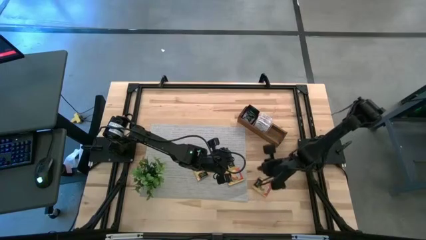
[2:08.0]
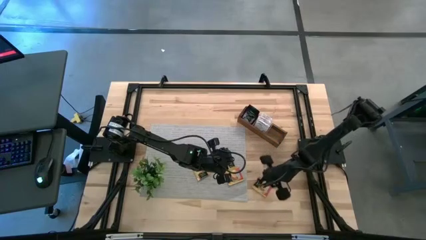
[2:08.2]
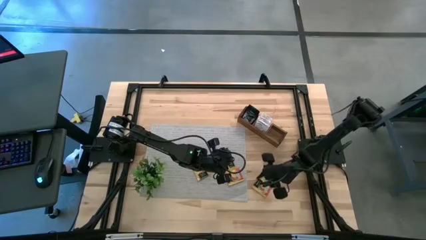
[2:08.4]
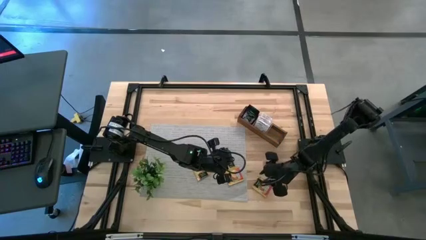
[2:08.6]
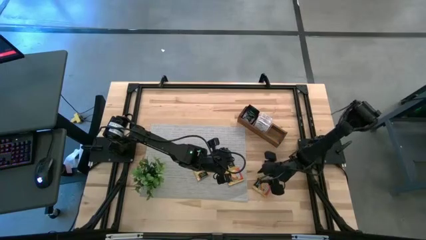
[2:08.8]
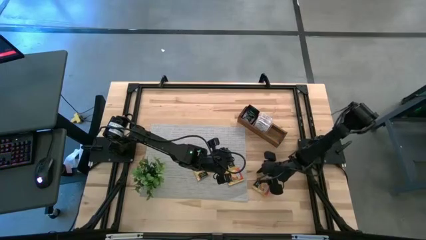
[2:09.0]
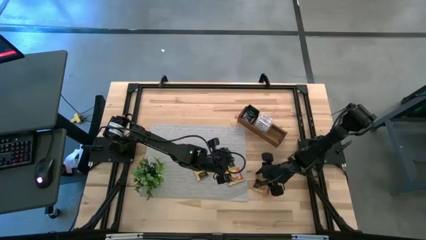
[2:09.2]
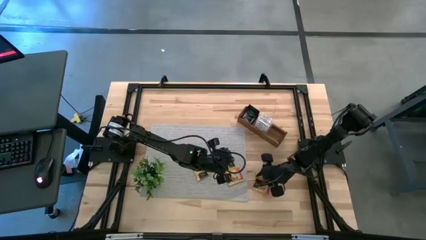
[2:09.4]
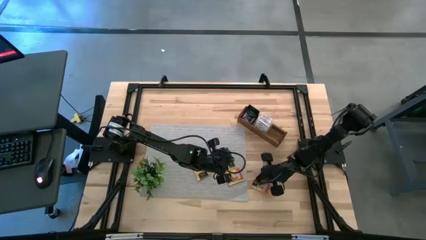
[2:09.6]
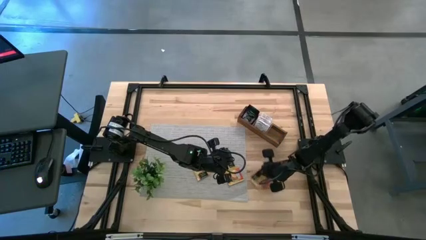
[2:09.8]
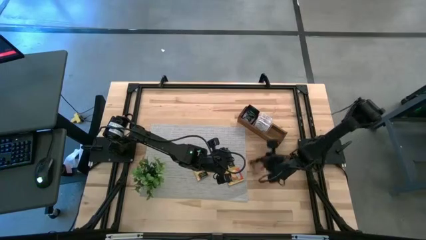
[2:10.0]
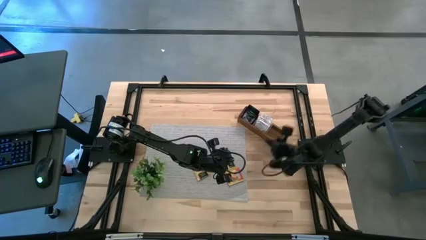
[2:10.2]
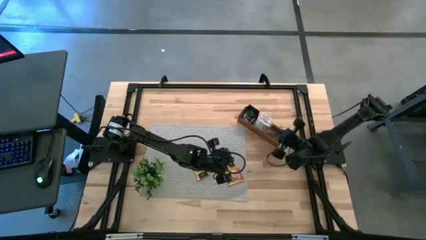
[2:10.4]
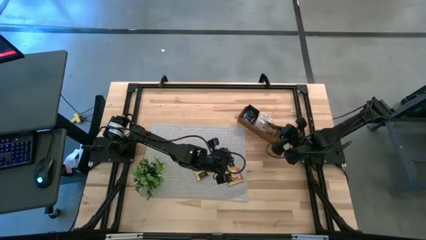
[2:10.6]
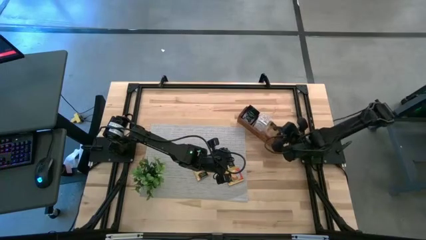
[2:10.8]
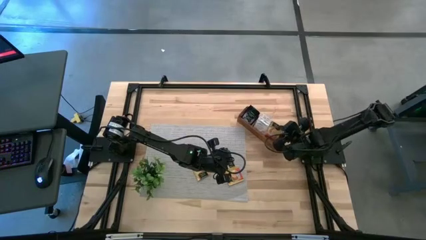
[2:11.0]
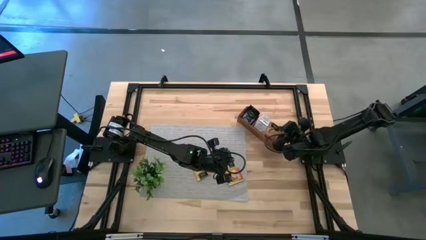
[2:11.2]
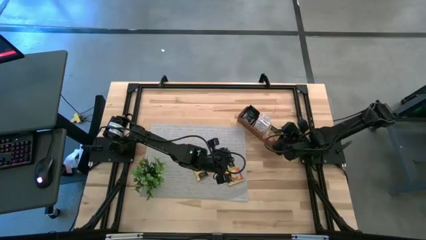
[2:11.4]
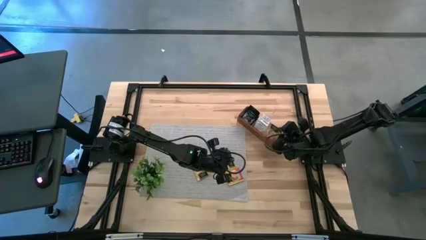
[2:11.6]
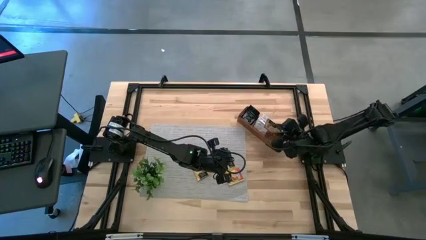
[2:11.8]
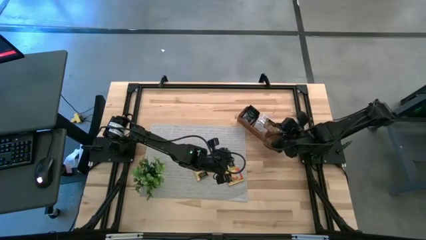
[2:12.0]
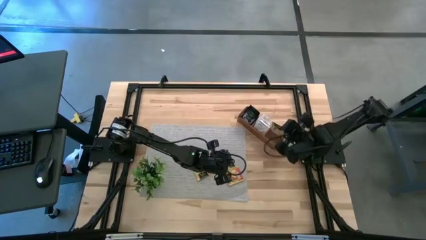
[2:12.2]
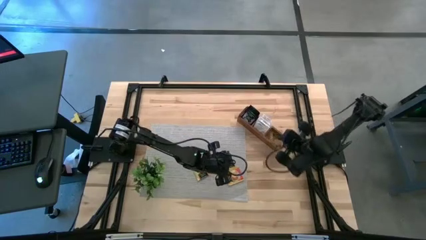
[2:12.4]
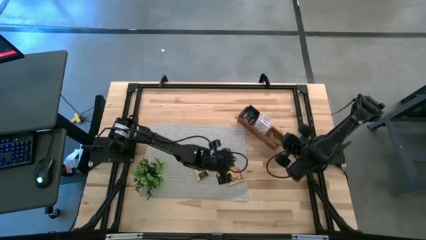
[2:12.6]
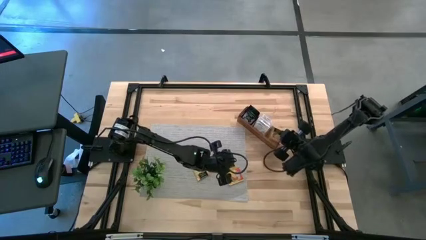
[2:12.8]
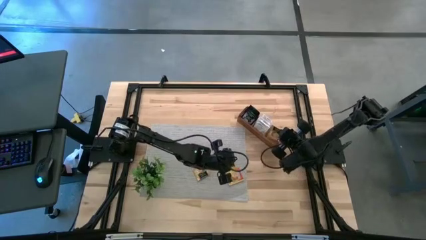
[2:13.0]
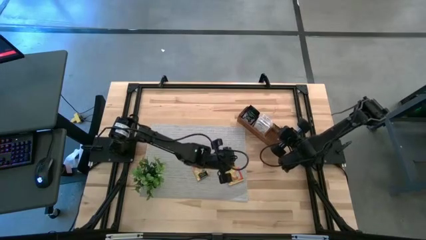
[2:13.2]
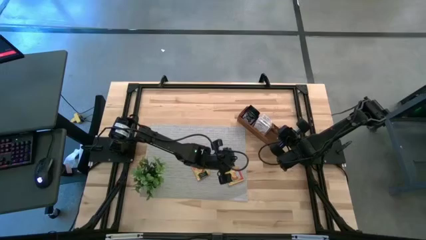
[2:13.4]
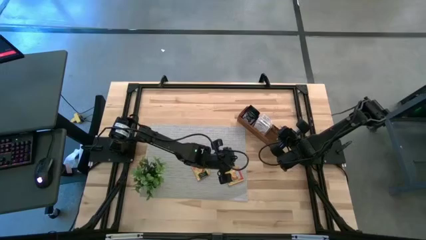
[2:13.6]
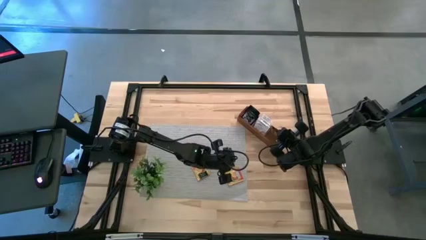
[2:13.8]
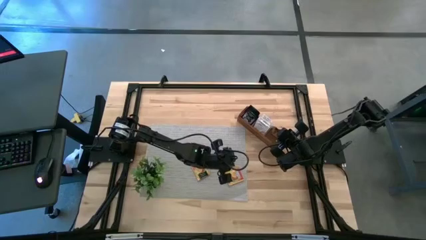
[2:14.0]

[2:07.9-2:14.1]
Task: Pick & Place Tea
Put the yellow tea bag into the right section of the wooden organizer

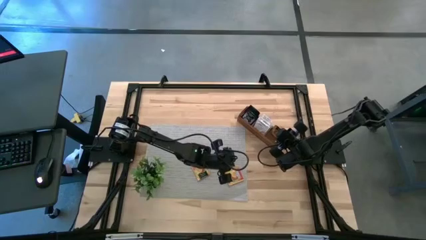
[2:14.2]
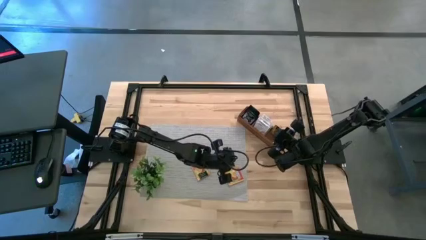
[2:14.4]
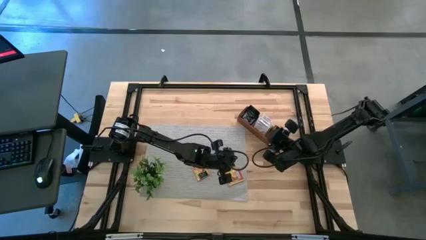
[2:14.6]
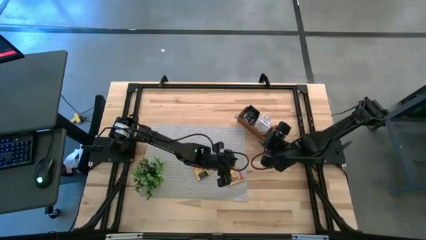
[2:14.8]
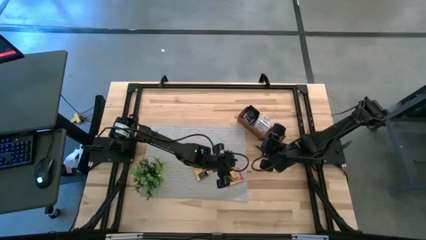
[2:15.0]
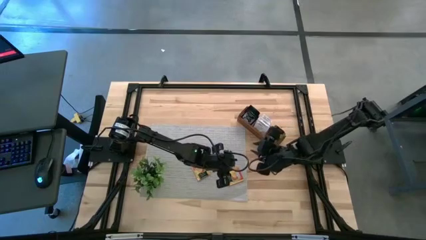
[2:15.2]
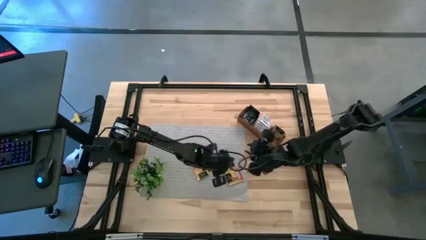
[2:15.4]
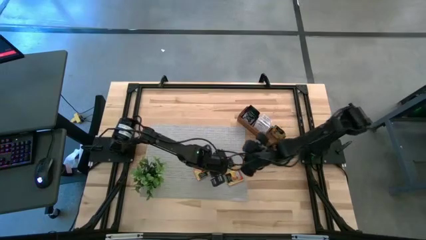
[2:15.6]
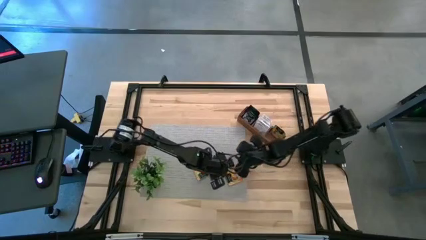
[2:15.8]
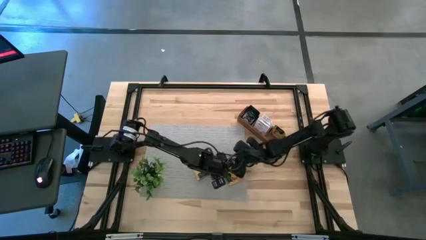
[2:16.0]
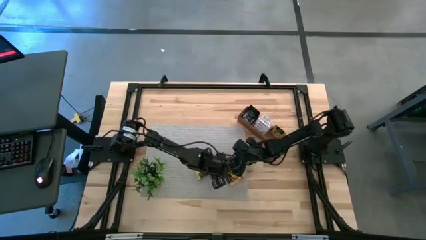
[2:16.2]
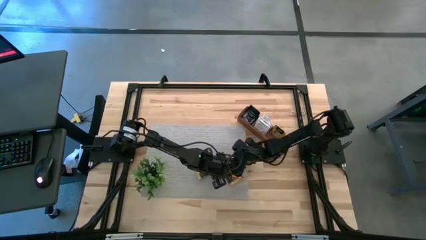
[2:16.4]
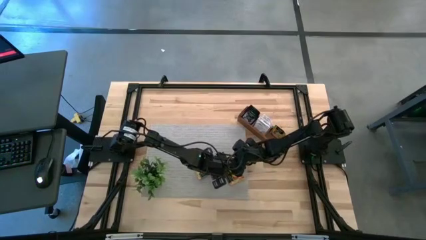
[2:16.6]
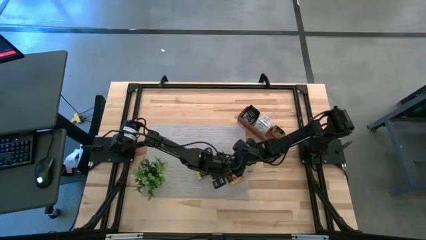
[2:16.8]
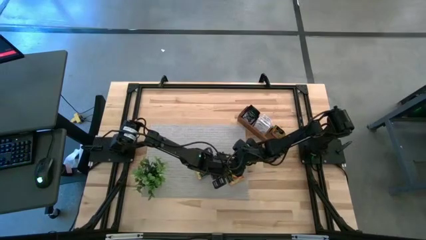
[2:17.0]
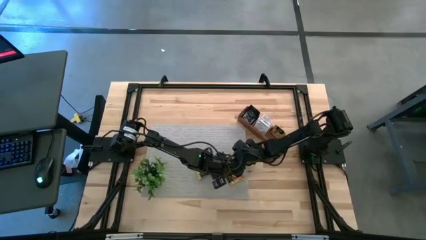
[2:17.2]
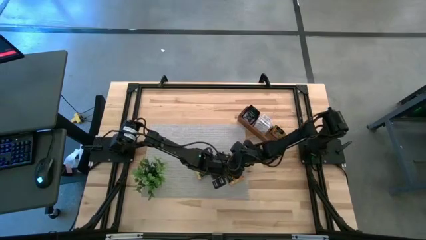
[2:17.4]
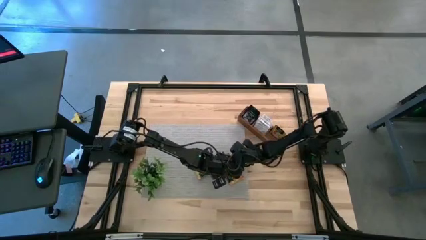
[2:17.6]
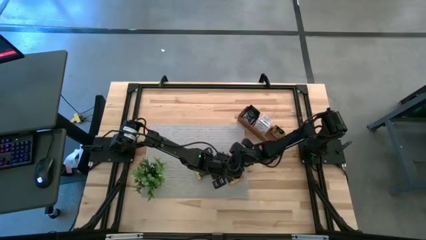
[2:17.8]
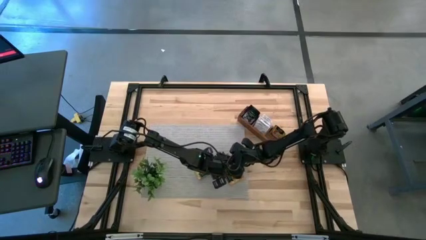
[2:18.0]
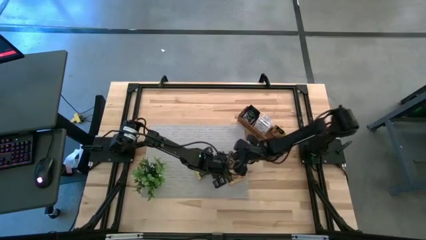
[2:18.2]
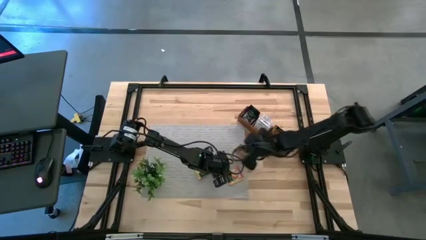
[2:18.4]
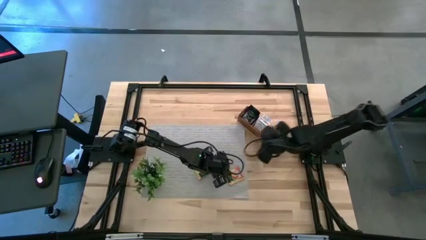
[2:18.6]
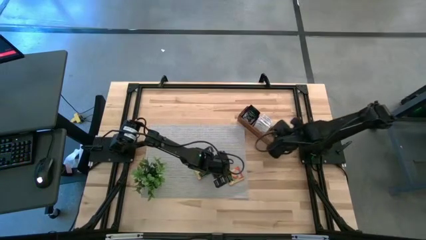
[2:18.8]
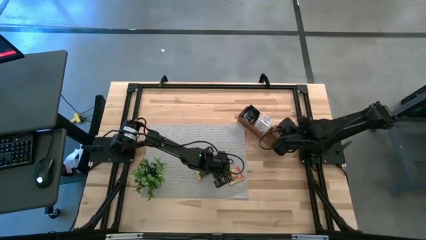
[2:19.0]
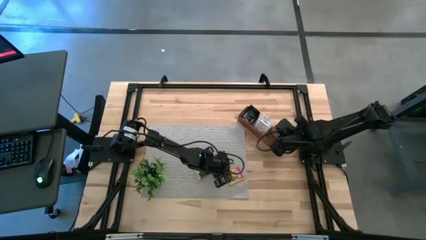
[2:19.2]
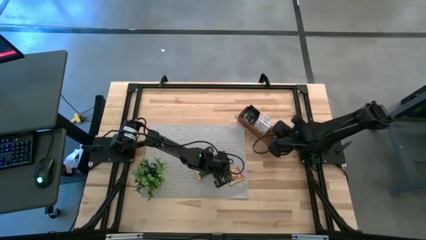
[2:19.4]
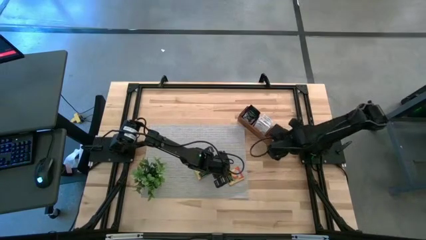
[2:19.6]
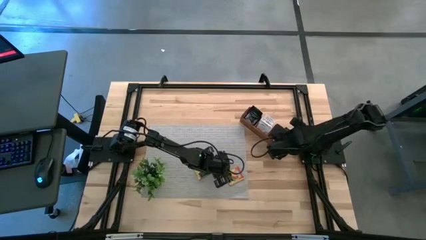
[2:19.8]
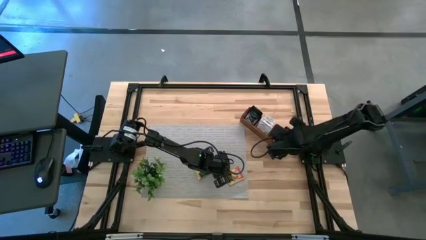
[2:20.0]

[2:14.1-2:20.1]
Put the yellow tea bag into the right section of the wooden organizer

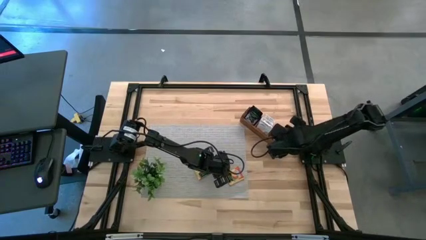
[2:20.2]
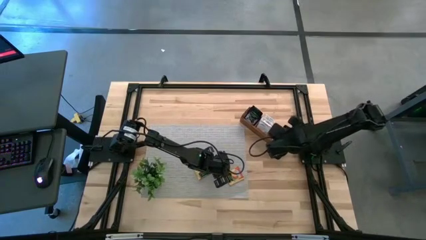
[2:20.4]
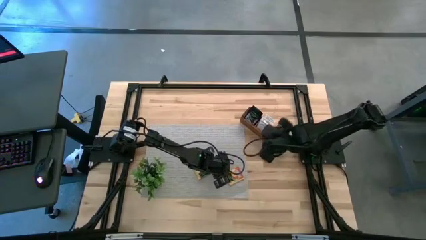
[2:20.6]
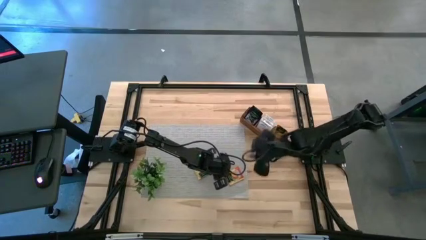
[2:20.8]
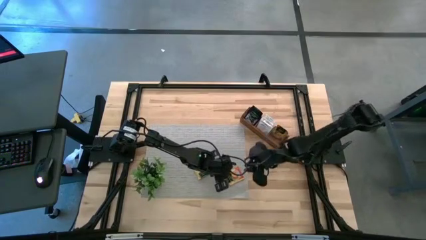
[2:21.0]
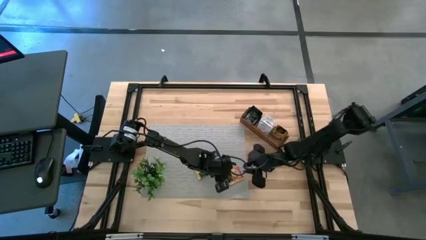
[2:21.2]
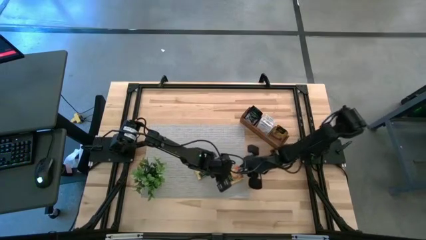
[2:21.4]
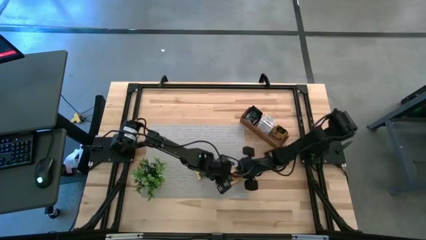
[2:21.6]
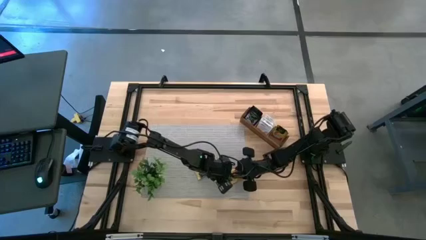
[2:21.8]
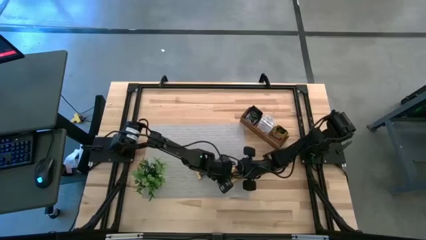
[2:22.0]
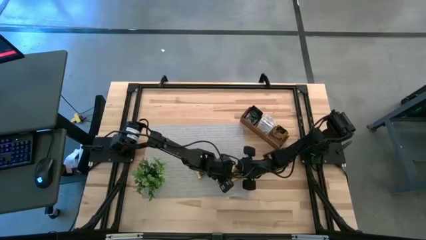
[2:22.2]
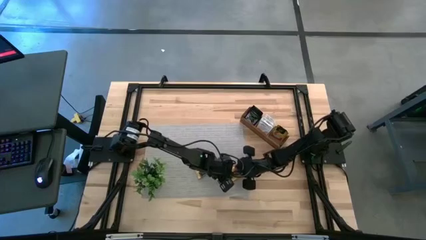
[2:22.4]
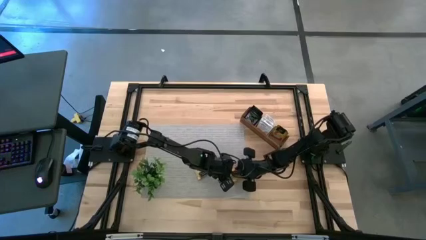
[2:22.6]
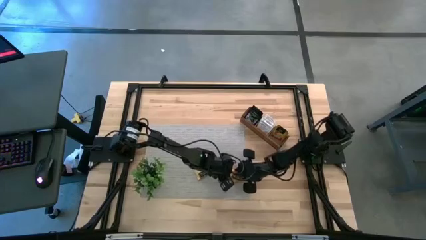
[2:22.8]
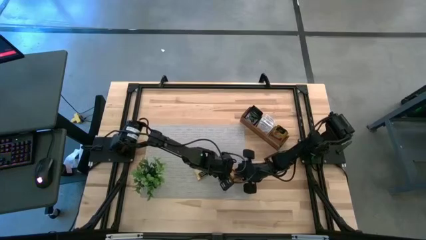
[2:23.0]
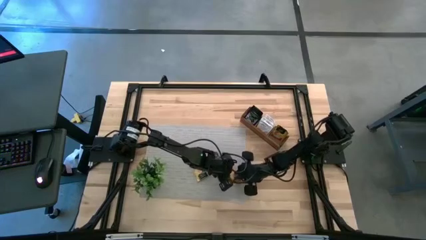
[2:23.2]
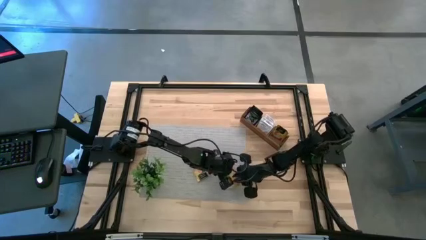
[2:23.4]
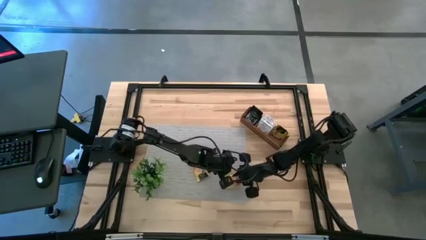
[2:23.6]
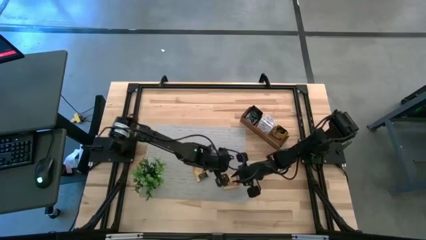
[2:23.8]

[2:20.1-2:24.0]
Put the yellow tea bag into the right section of the wooden organizer
